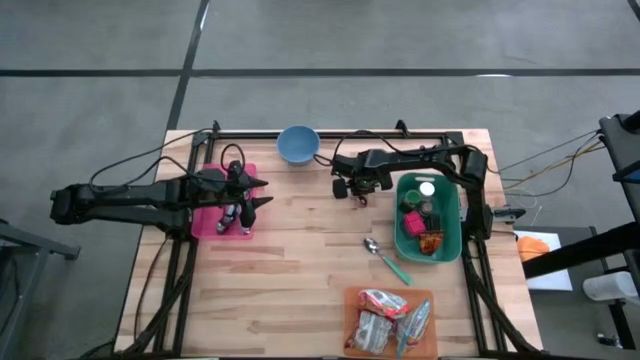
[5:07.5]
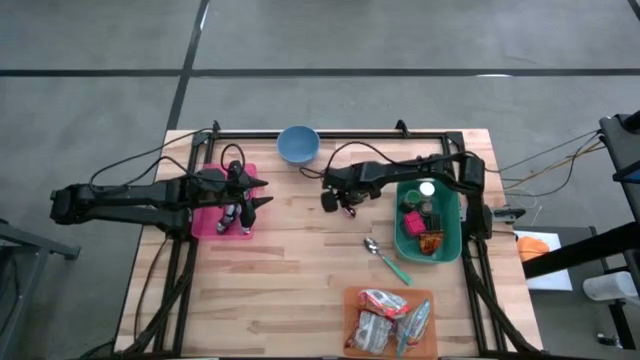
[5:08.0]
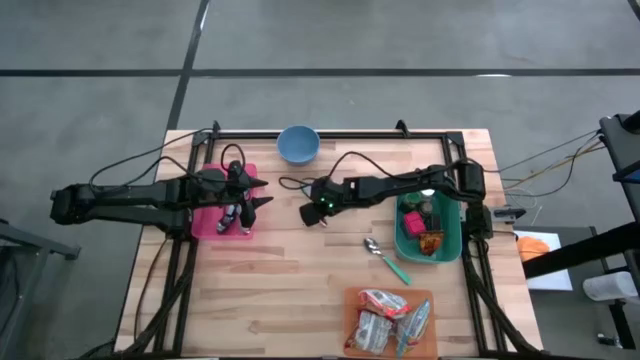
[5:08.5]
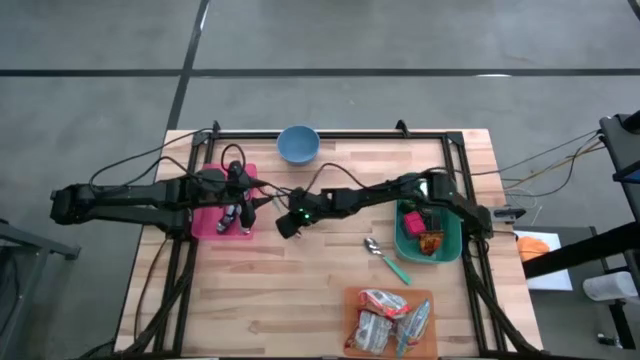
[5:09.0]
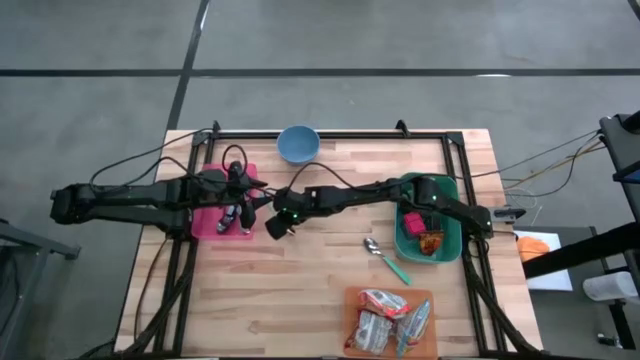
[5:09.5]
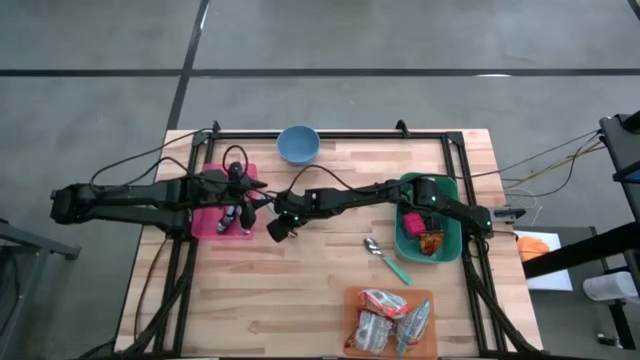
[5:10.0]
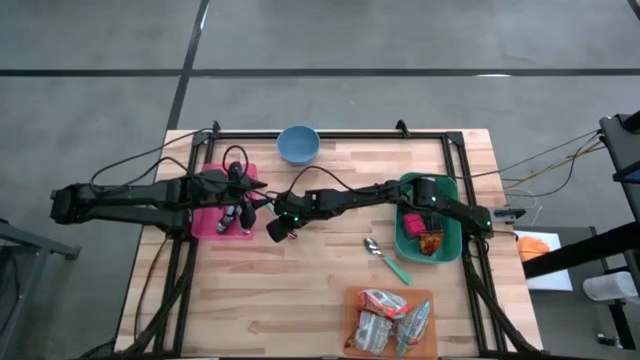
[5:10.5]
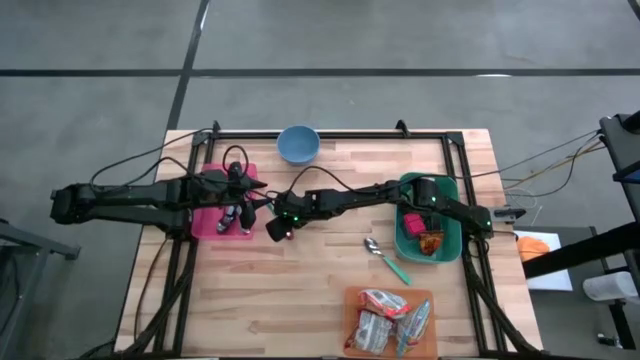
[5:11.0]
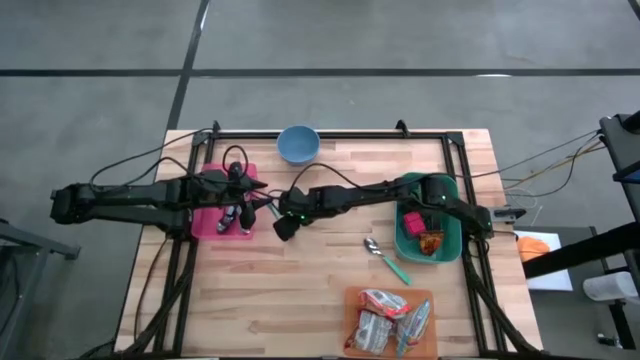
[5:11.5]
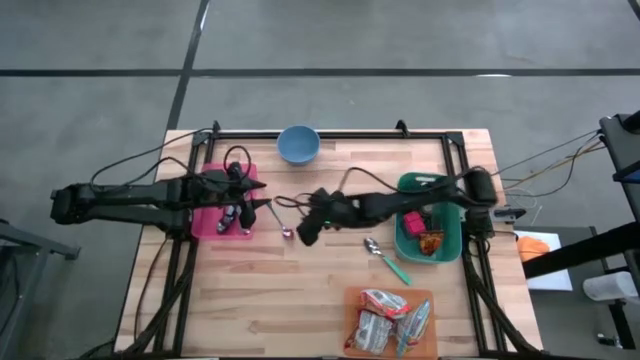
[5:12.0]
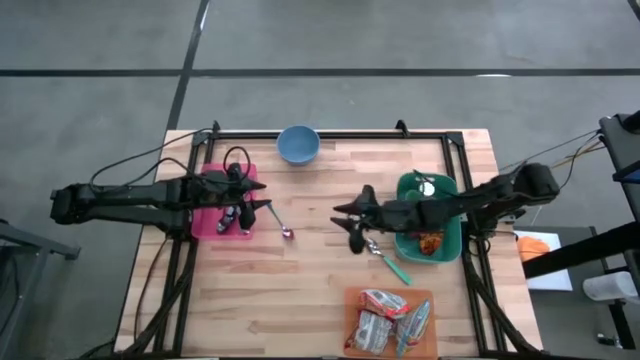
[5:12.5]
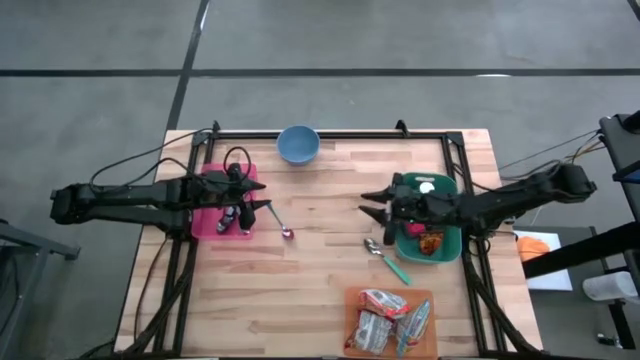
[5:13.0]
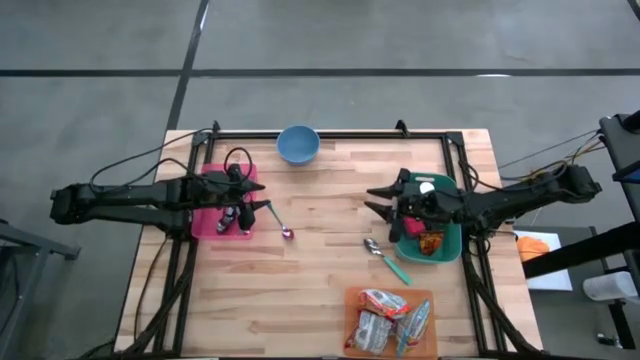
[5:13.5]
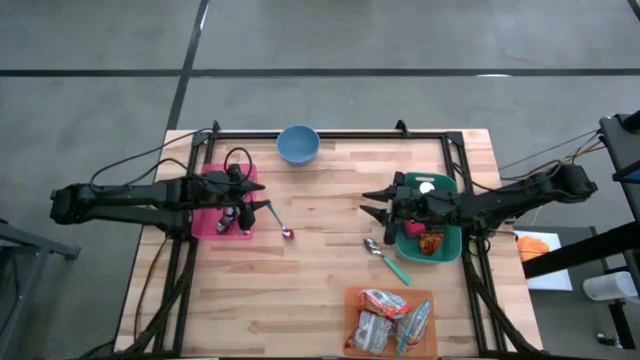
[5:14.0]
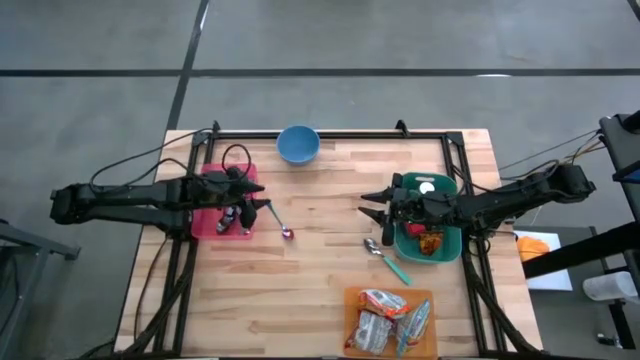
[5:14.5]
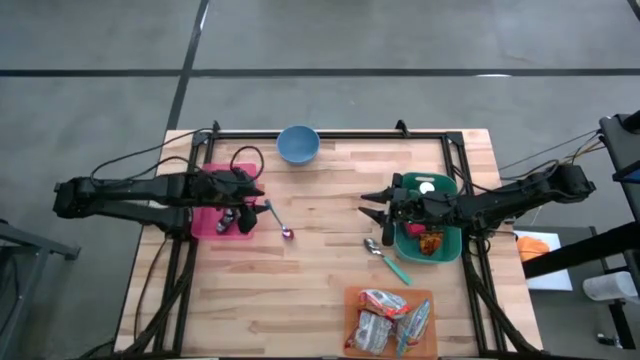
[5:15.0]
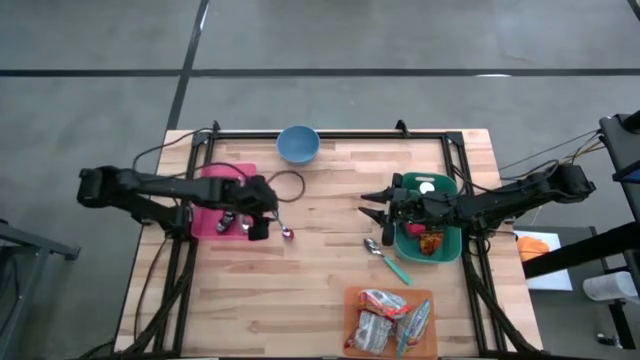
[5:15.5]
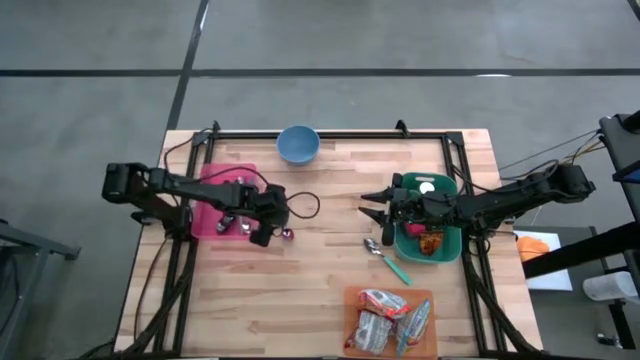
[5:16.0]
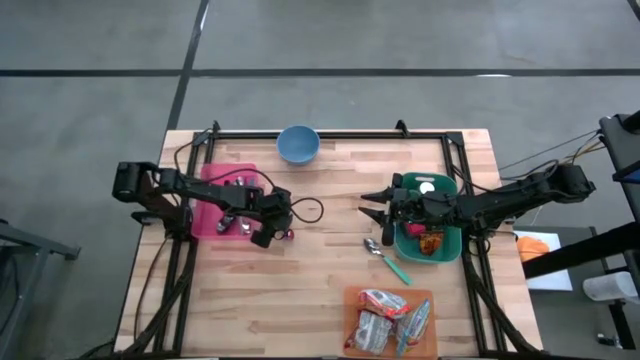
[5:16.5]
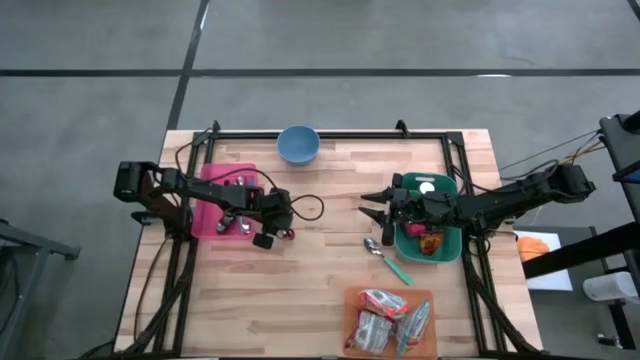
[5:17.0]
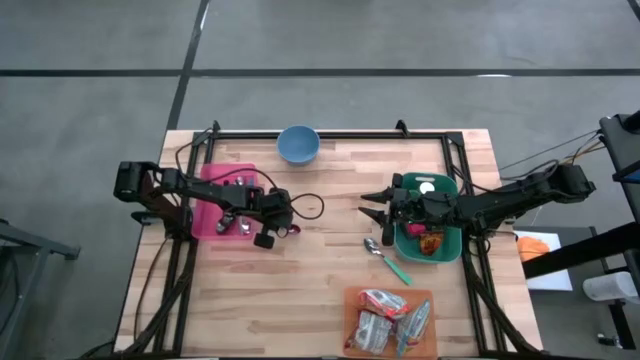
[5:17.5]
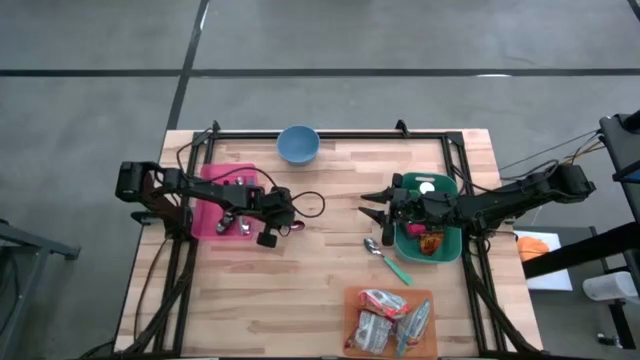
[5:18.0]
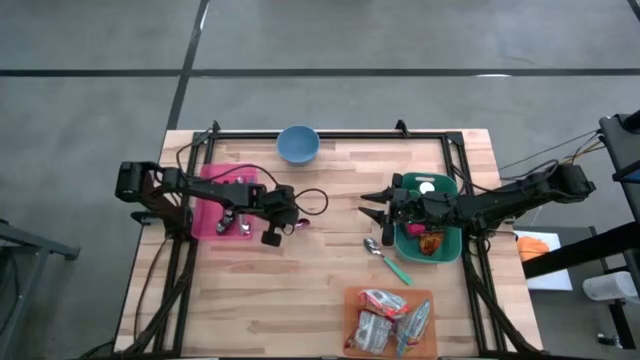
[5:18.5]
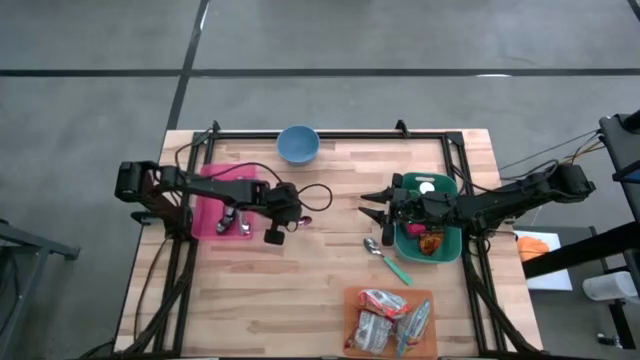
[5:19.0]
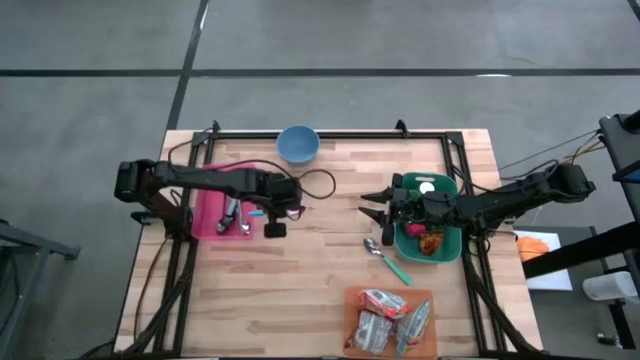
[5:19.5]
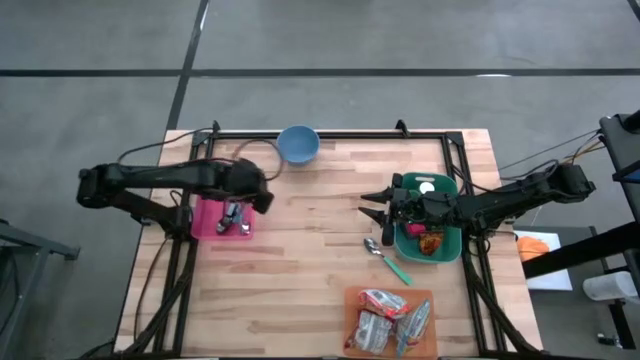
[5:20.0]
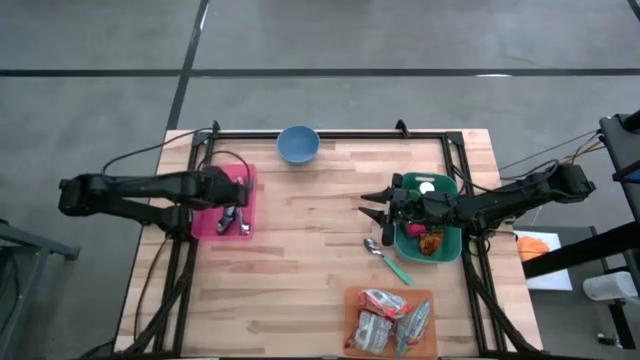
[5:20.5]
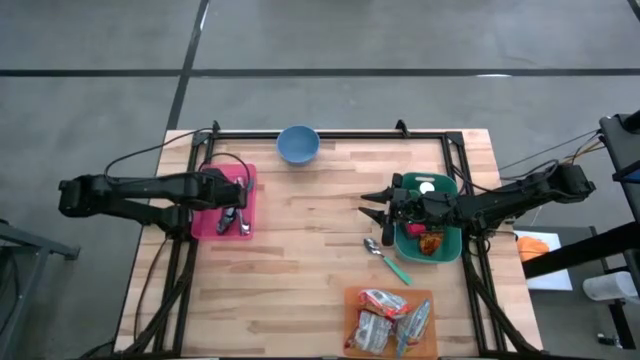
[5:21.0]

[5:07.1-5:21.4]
Put the purple spoon into the pink bin

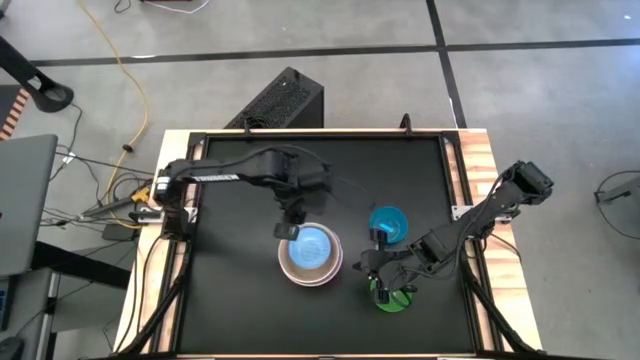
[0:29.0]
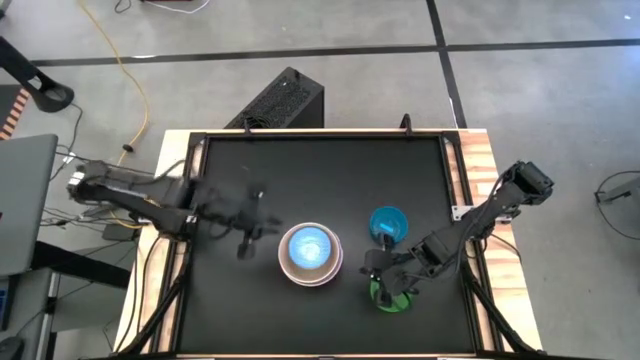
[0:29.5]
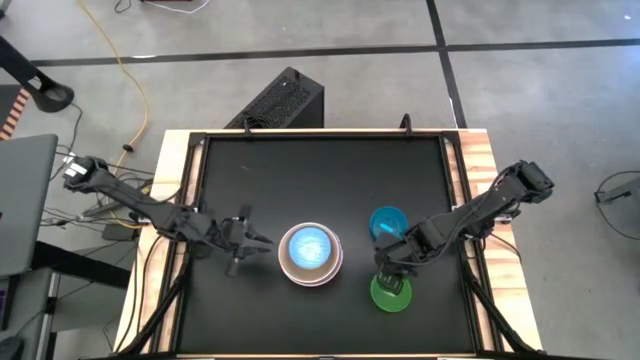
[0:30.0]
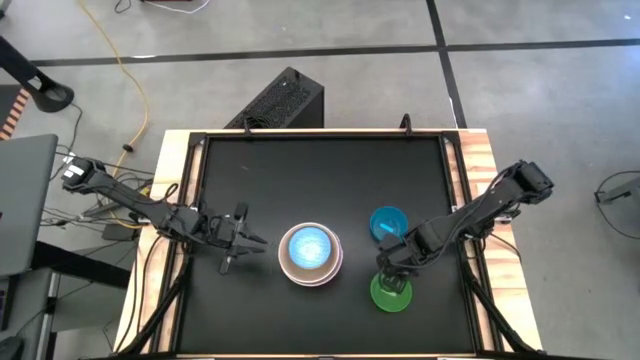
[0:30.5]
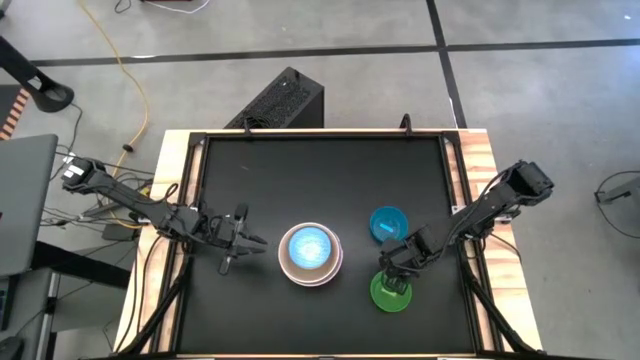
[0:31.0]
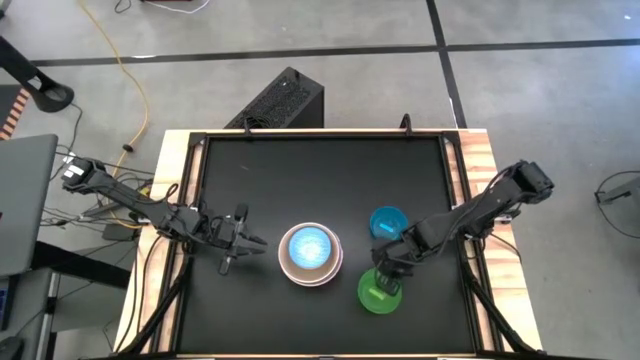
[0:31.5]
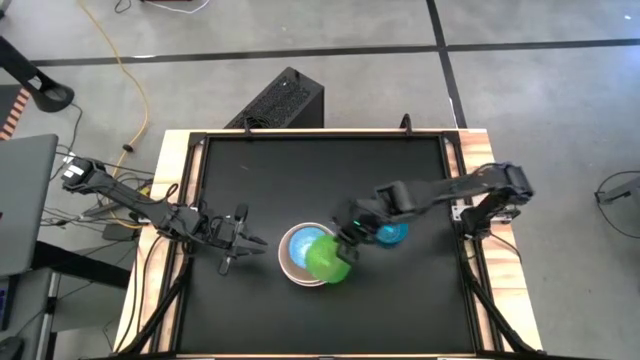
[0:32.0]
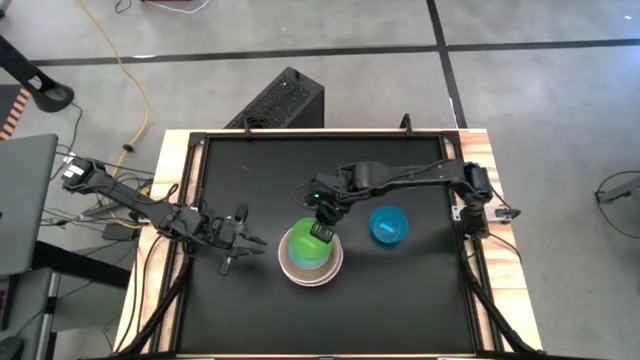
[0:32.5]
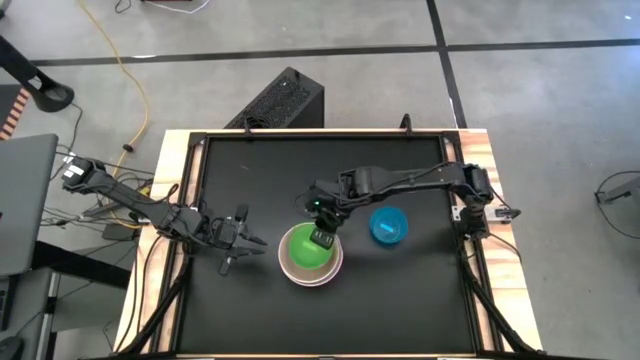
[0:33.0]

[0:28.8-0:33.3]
Stack the transparent green bowl on top of the blue patterned bowl

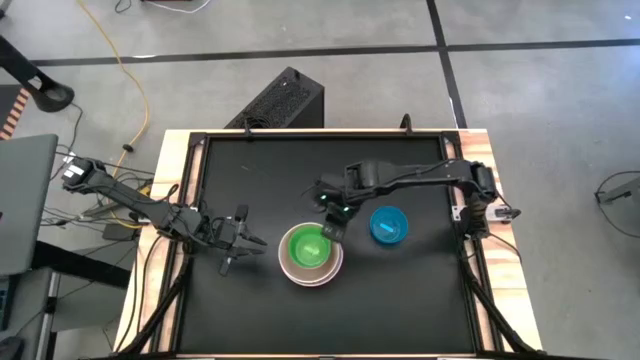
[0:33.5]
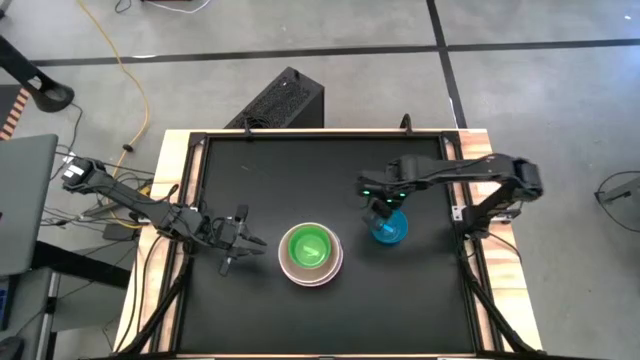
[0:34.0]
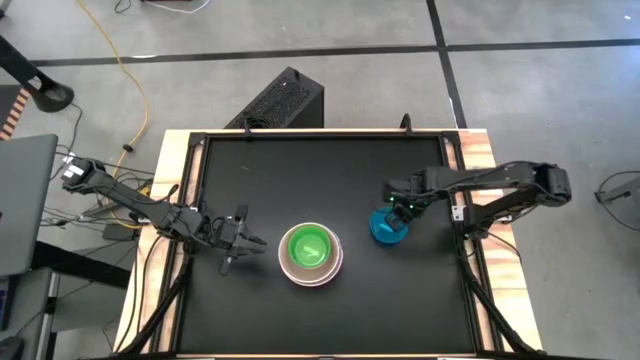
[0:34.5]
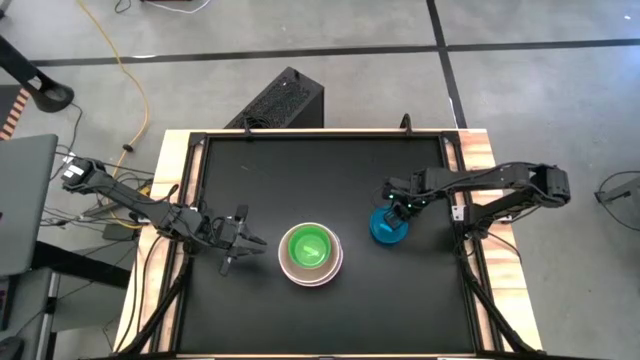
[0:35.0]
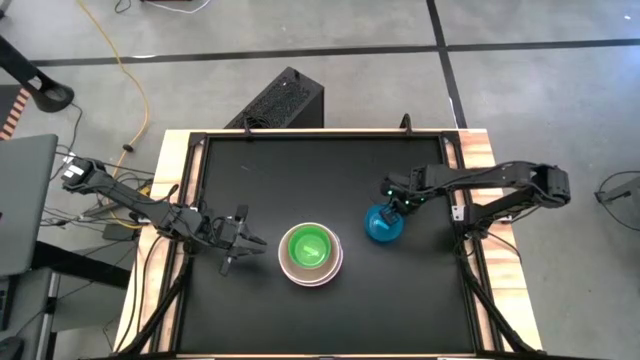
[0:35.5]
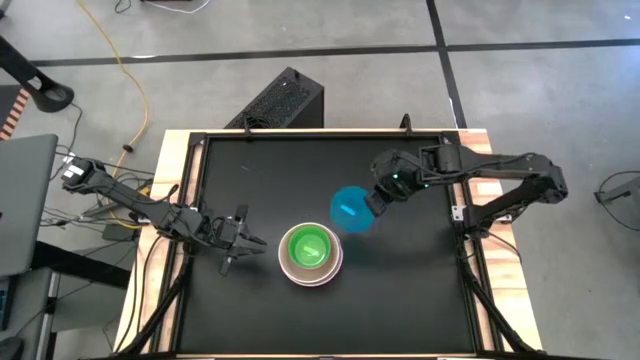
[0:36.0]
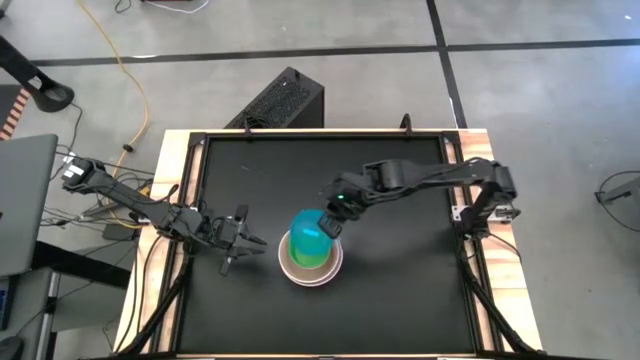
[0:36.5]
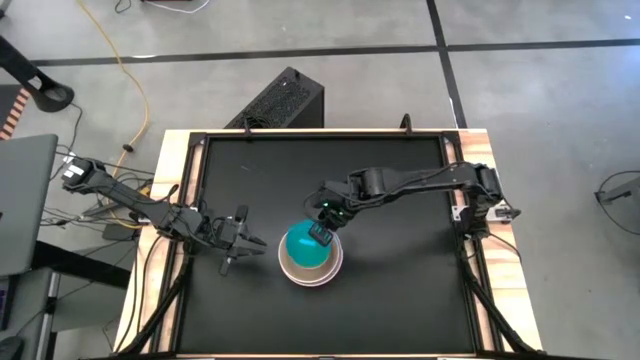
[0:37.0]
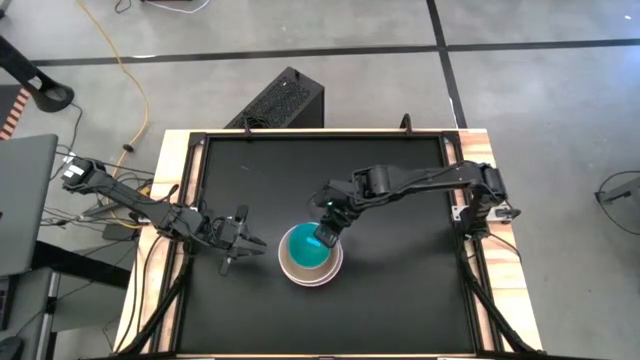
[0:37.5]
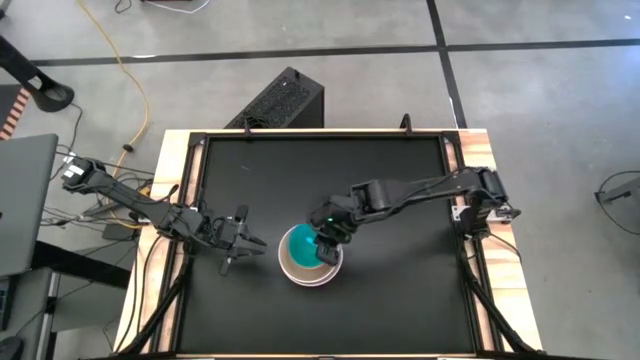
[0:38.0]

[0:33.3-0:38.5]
Stack the transparent blue bowl on top of the transparent blue bowl
